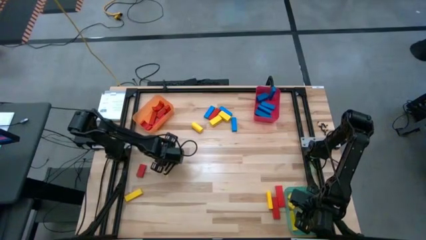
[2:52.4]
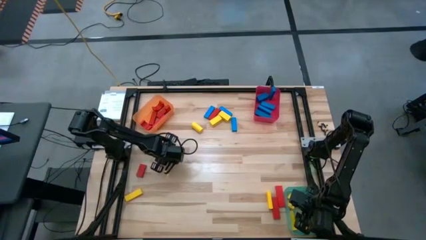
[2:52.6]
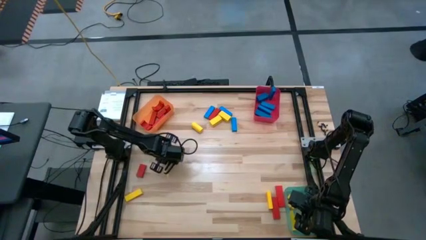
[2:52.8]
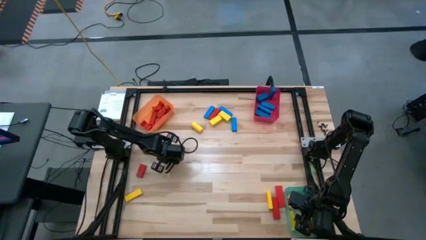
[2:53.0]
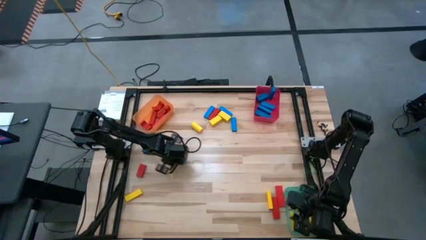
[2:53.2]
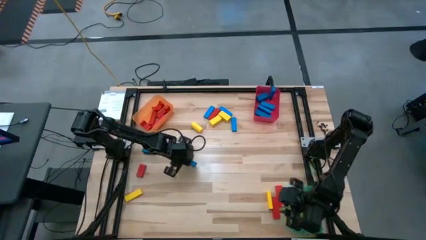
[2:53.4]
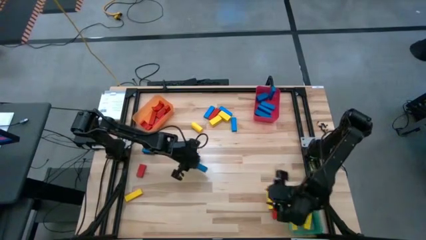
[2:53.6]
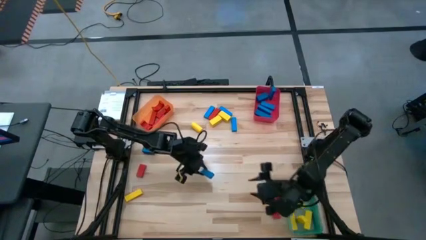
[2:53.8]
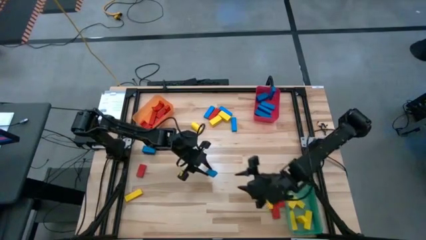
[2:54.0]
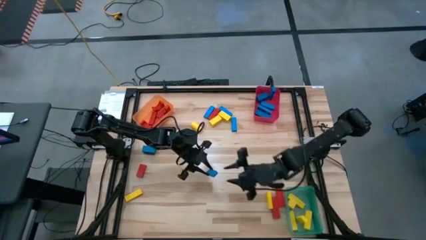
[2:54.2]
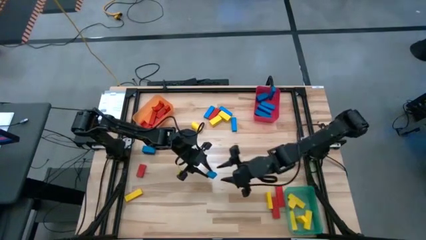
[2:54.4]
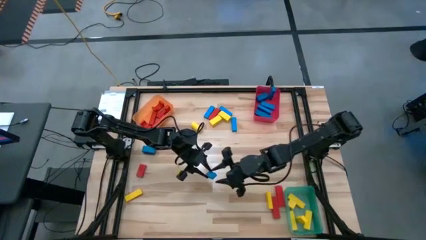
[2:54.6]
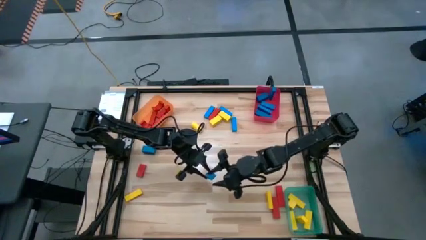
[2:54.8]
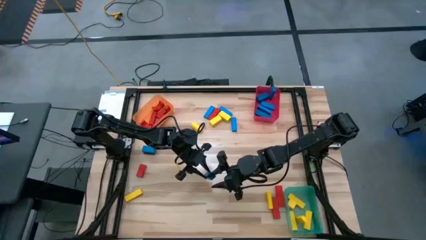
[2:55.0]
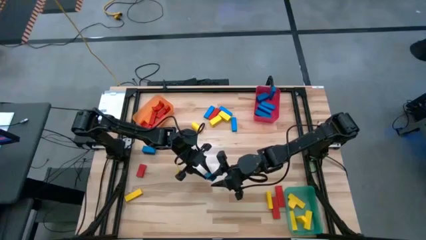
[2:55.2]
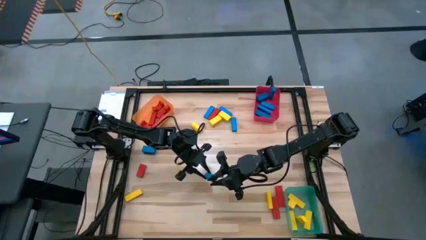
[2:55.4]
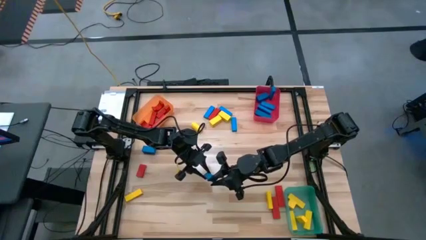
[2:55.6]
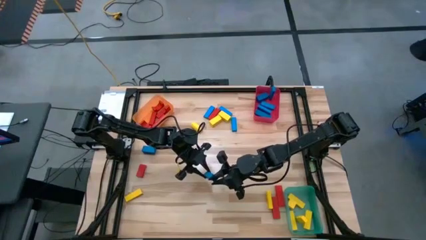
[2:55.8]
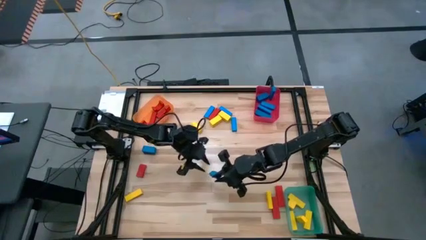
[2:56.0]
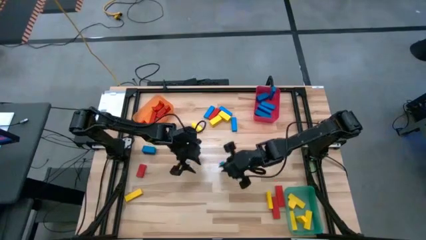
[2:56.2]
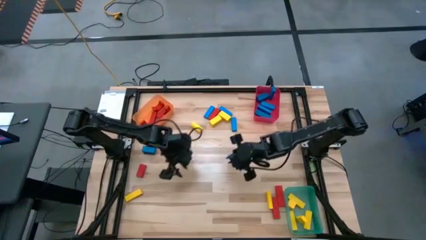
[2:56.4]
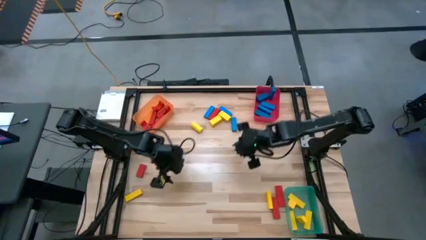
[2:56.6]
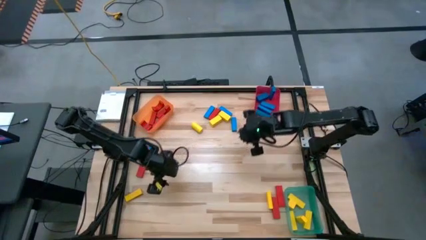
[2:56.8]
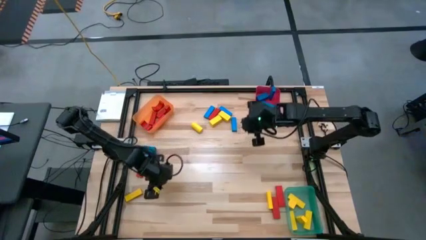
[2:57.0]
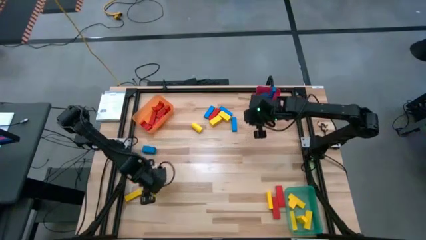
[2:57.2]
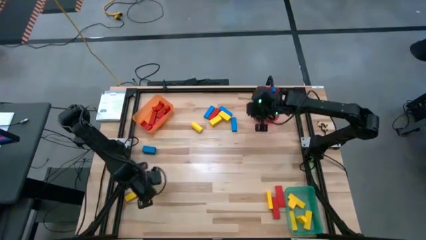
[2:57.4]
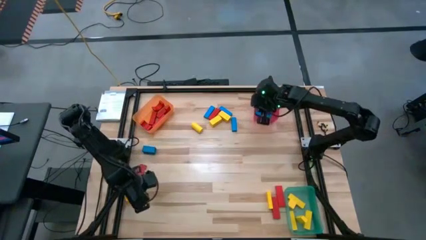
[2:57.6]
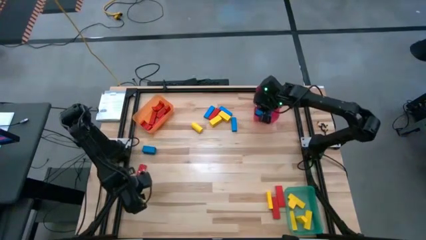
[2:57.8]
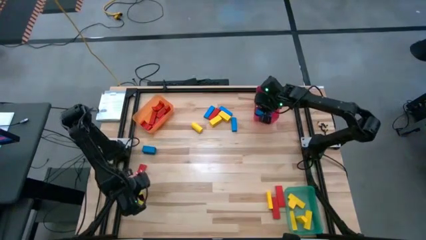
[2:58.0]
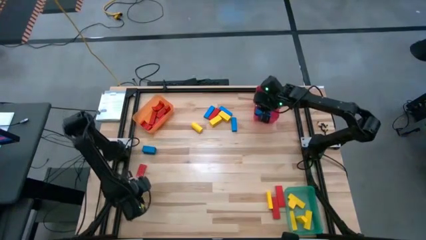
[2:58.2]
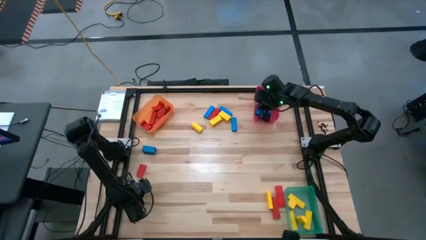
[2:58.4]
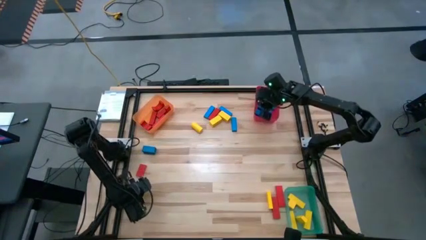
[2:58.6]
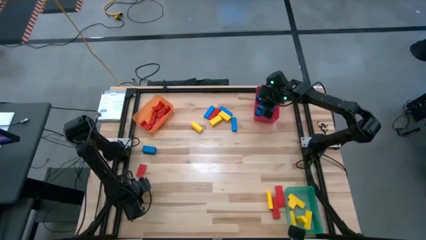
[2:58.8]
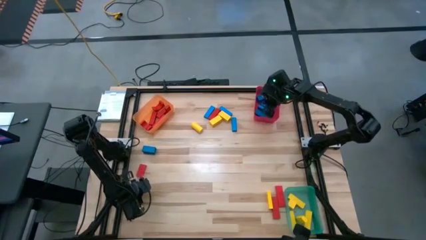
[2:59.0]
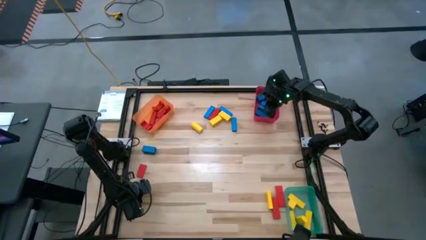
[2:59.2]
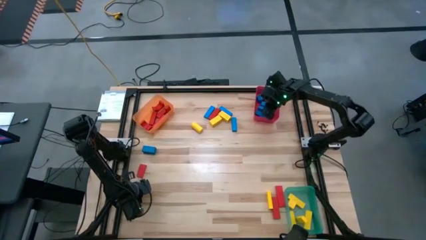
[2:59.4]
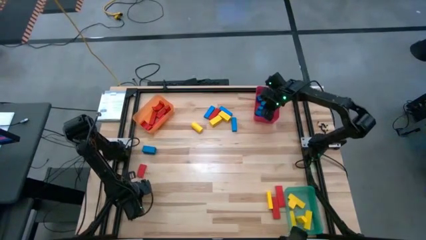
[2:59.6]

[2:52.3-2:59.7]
Task: Sort blocks
Put the blue block into the red bin

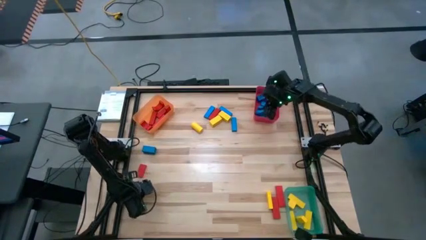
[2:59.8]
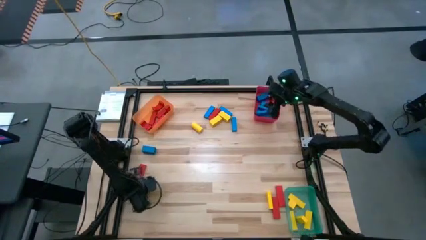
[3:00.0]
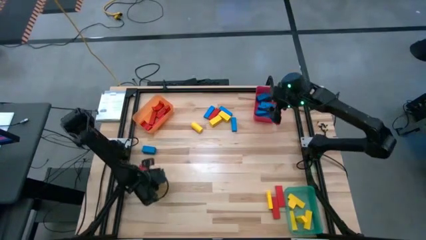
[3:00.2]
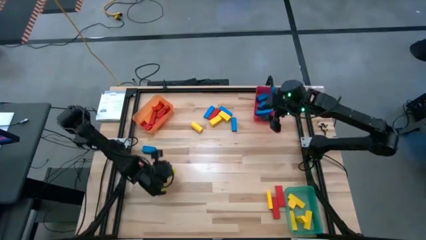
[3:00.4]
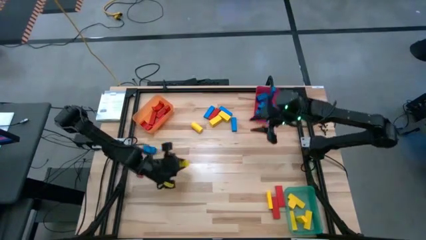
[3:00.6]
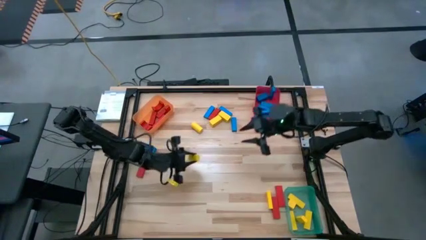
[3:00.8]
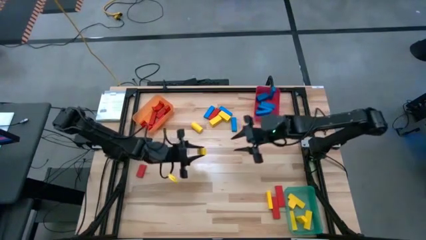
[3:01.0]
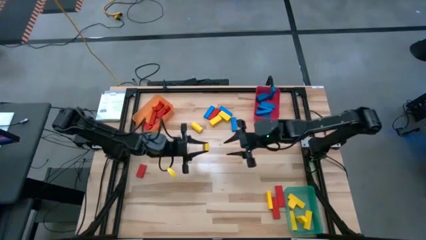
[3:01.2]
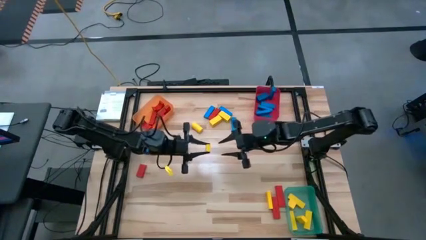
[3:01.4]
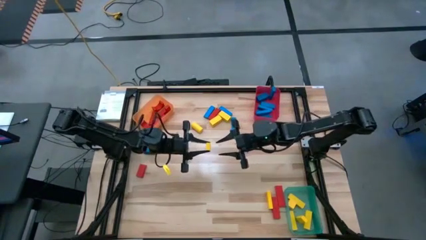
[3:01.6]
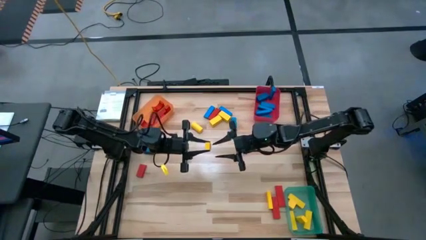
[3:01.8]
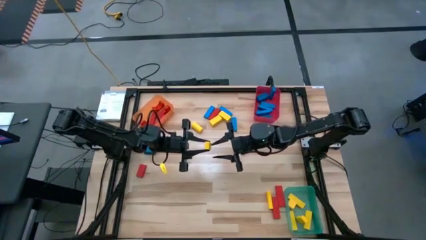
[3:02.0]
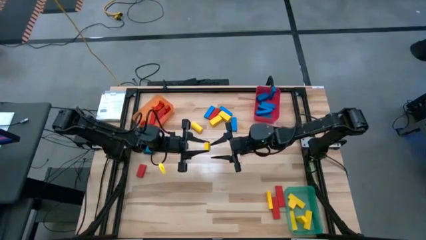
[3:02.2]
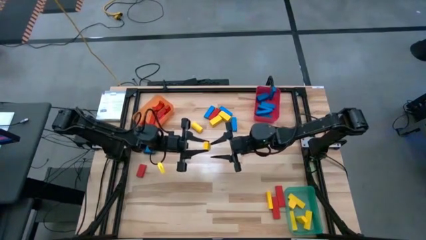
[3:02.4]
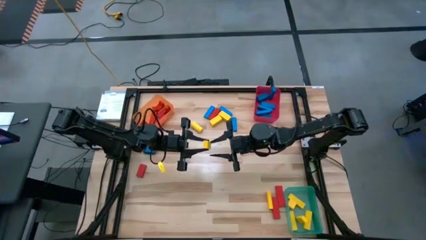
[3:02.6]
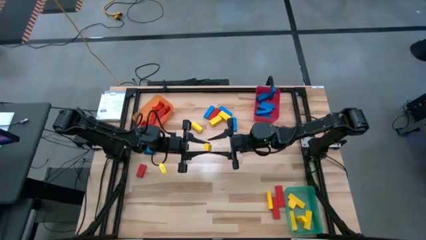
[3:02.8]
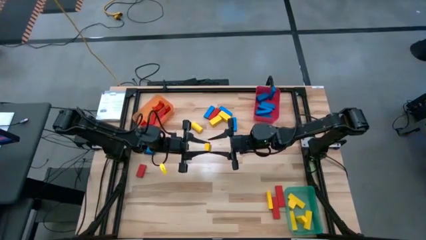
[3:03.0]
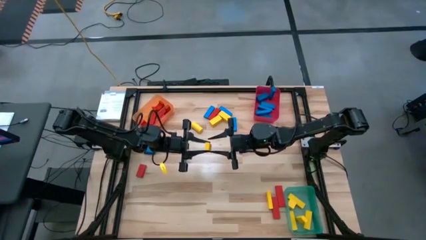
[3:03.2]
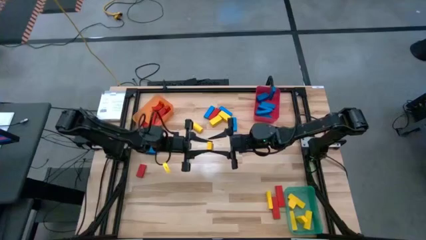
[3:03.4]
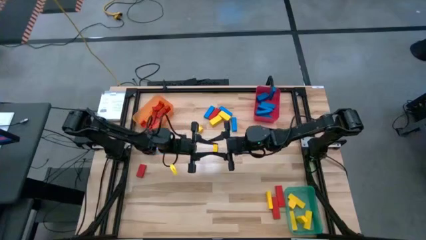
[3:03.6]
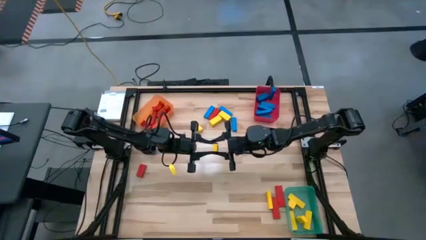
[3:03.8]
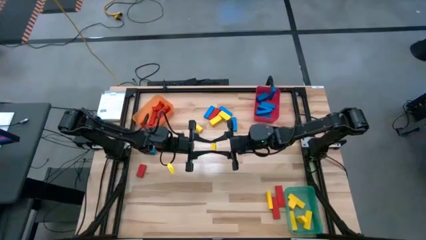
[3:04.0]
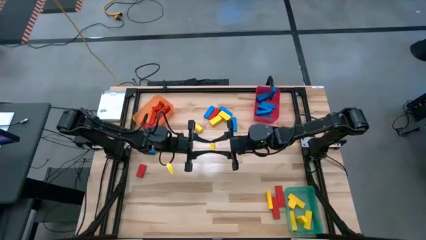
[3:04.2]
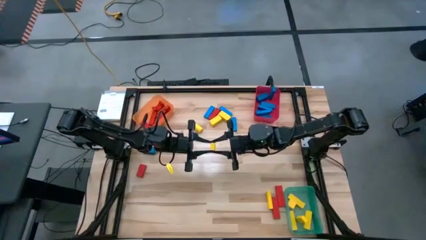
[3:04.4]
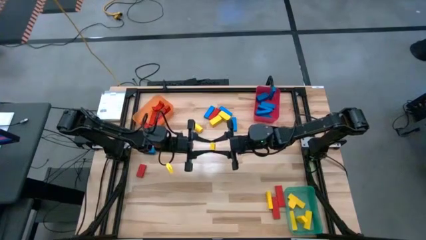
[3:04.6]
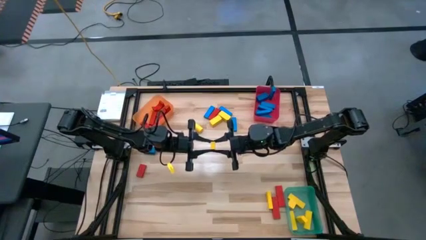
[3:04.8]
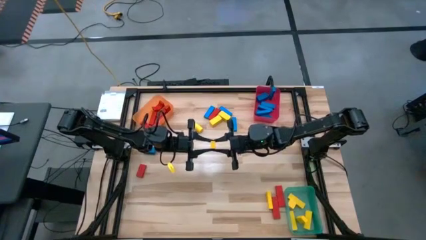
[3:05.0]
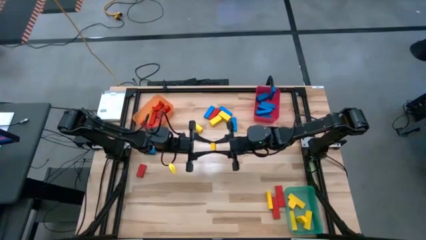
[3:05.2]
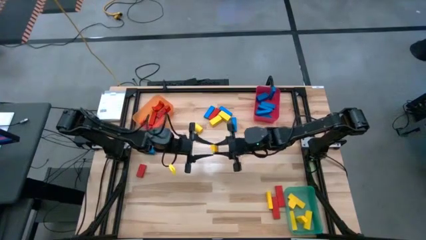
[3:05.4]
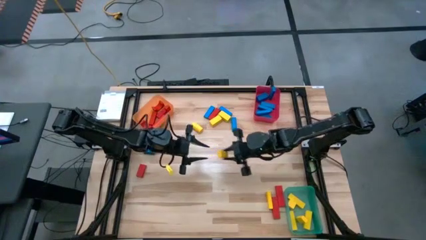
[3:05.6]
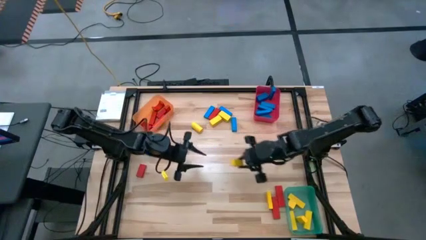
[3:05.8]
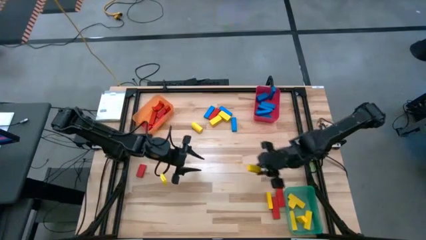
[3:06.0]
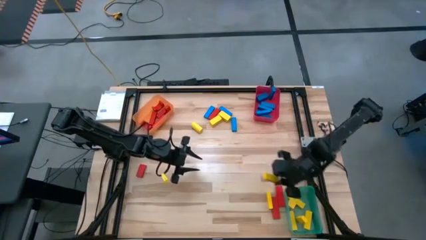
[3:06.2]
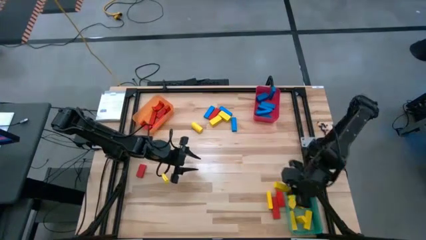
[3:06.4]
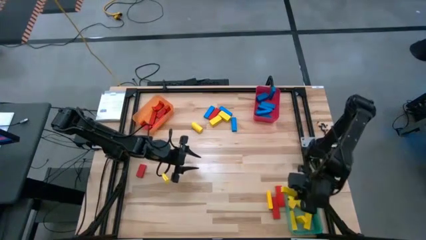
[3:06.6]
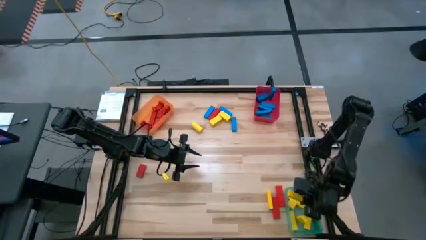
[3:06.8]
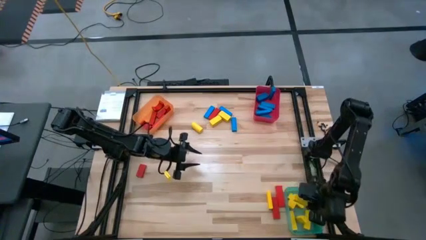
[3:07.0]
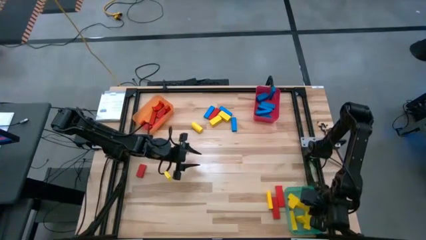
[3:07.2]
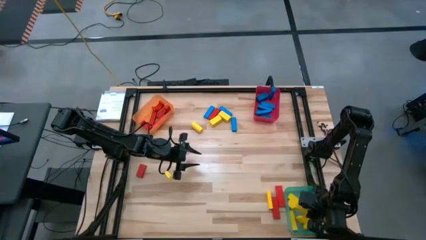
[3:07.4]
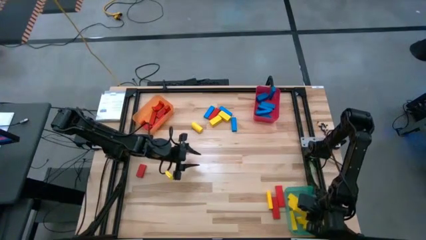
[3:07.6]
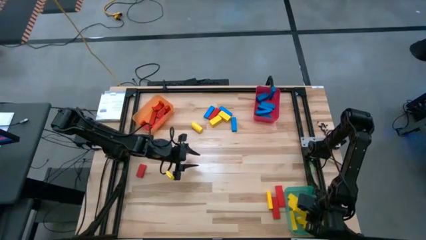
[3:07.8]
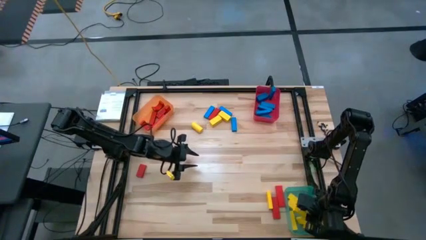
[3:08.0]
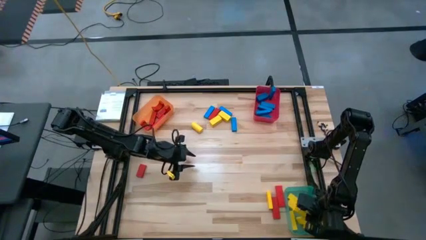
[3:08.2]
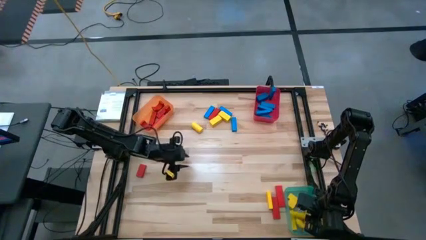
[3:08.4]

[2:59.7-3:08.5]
Put the yellow block into the green bin
